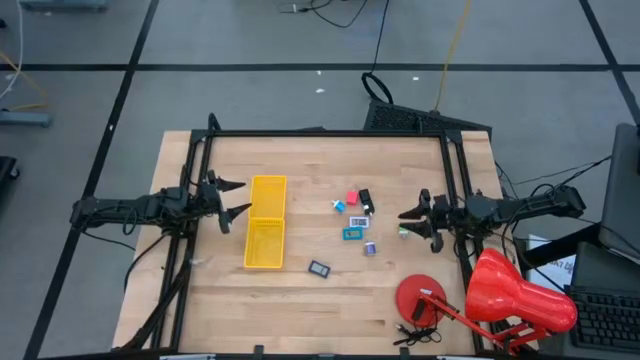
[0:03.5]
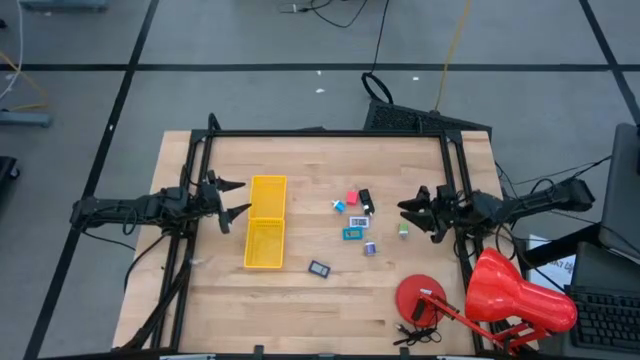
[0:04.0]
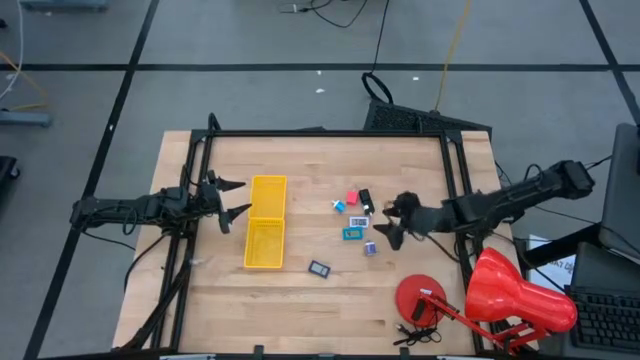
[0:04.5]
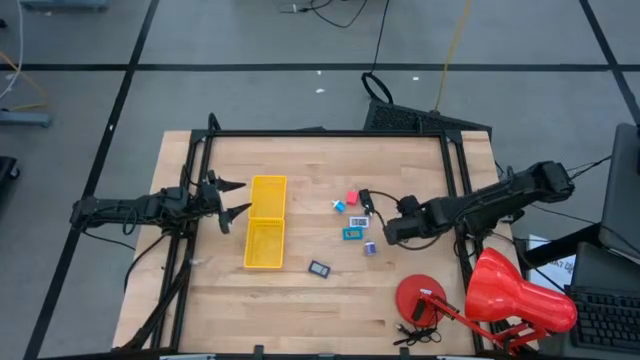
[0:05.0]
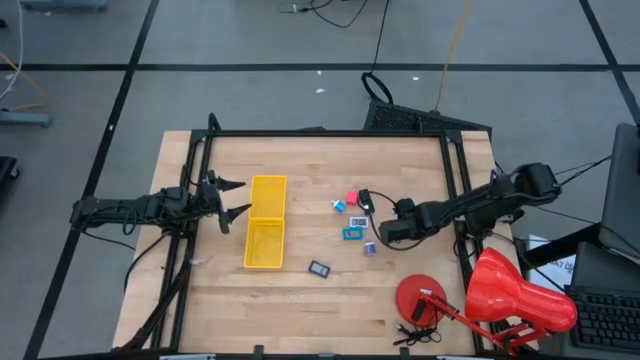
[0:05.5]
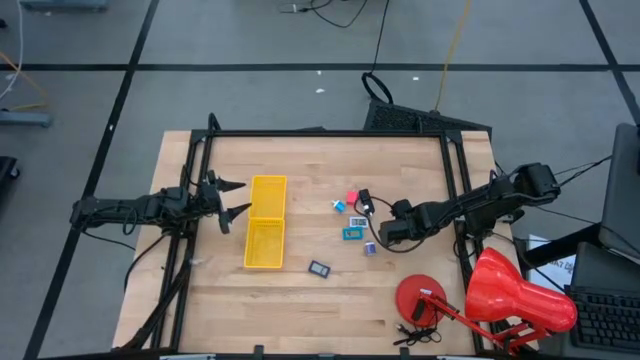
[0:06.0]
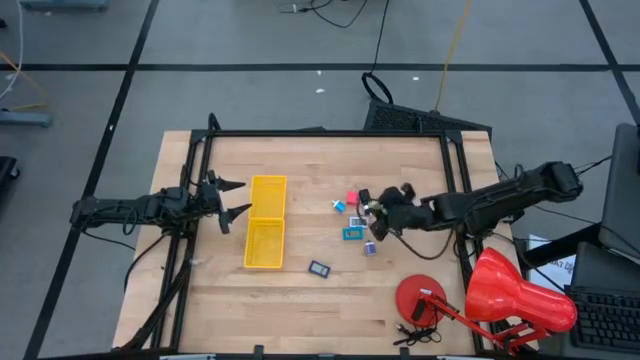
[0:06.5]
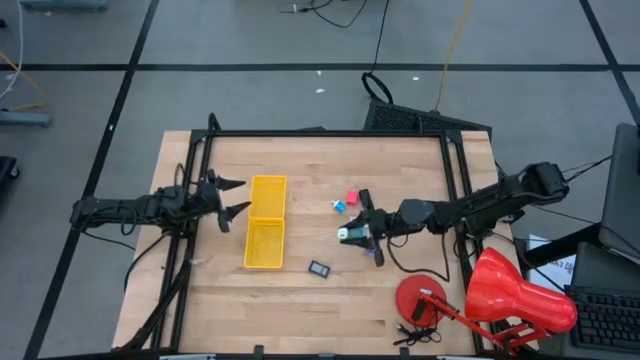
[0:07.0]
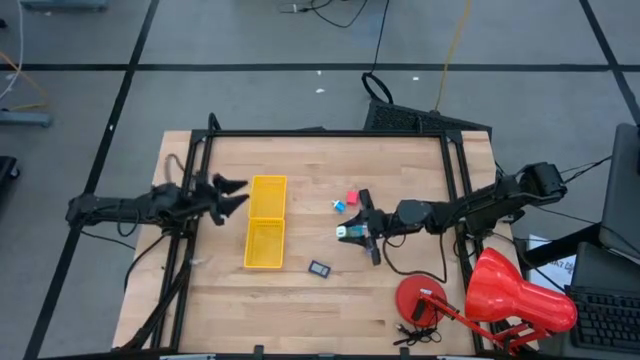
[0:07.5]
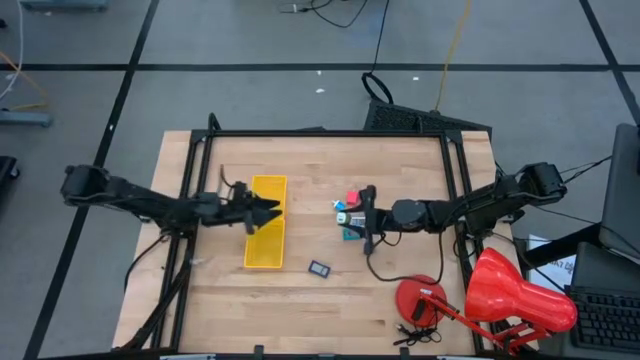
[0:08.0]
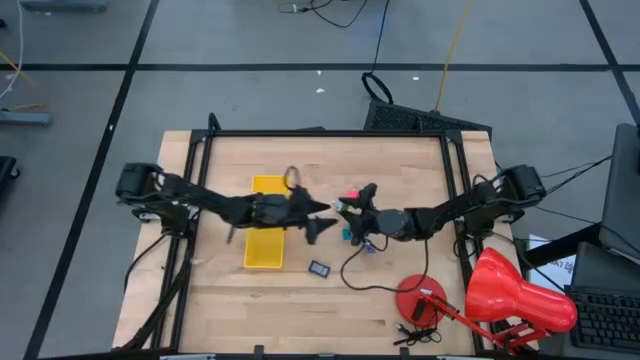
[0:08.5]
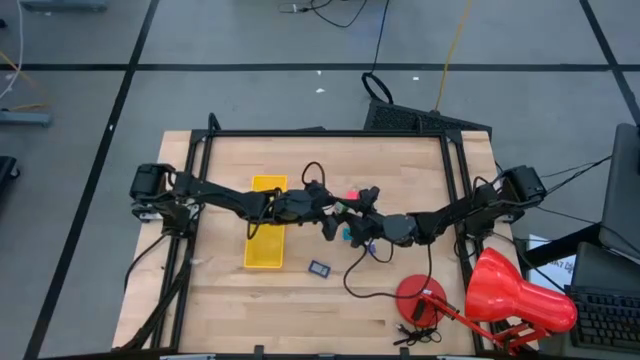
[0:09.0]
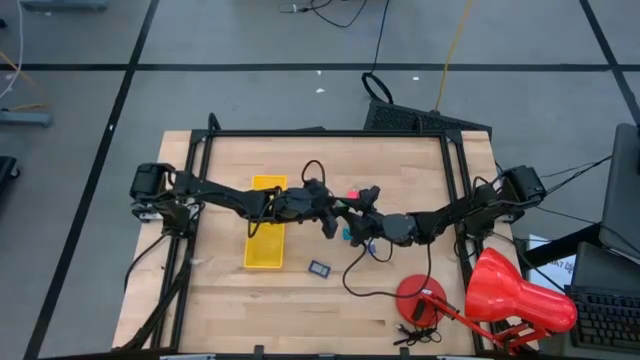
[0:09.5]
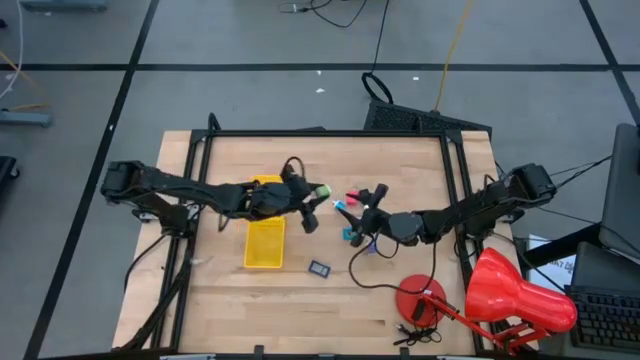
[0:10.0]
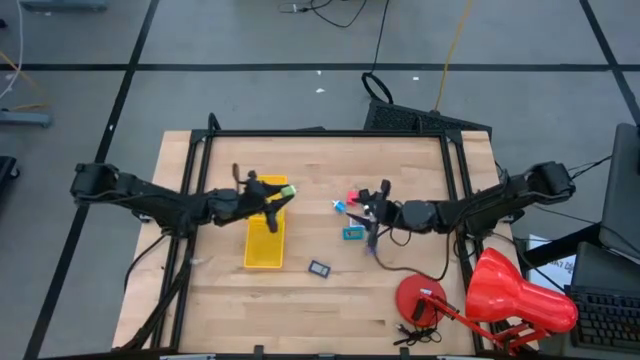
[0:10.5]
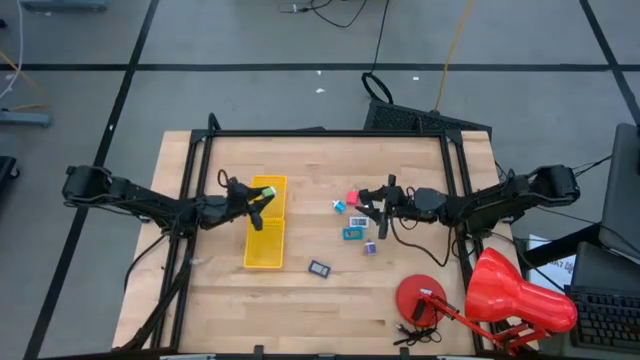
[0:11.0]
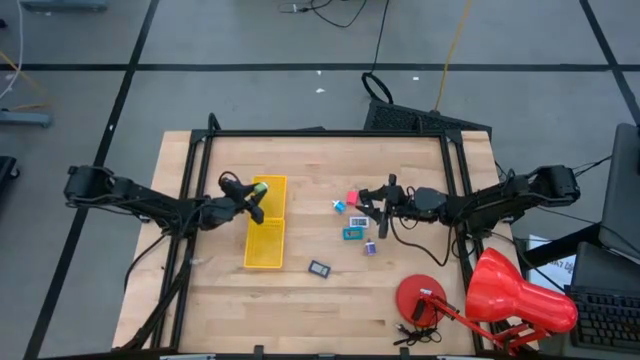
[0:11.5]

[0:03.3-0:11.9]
Task: Pick & Place Office items
Put the green adapter into the top yellow basket

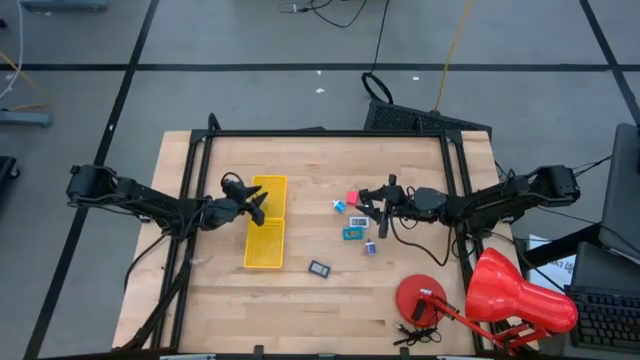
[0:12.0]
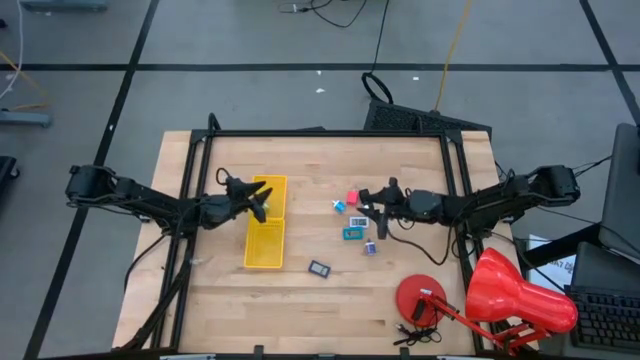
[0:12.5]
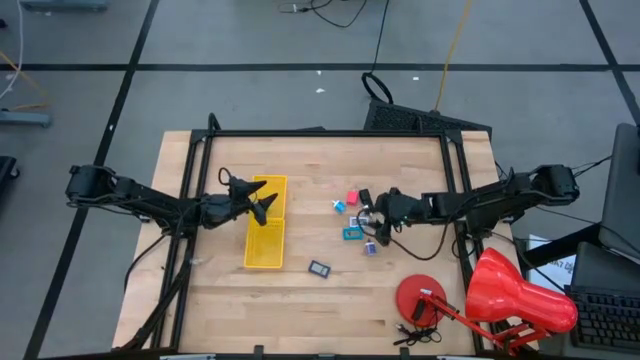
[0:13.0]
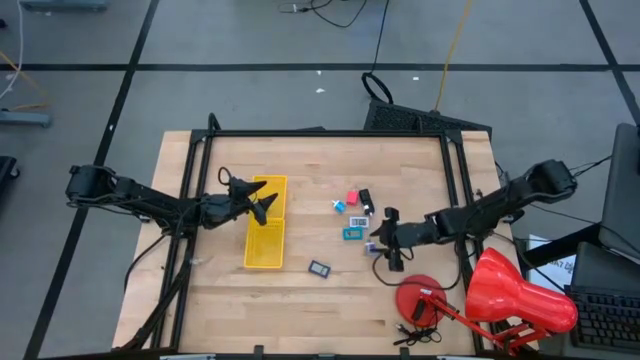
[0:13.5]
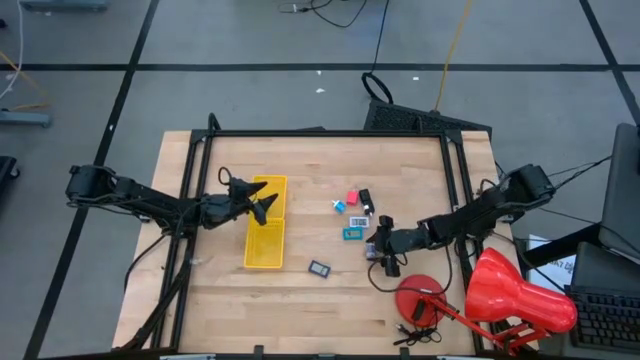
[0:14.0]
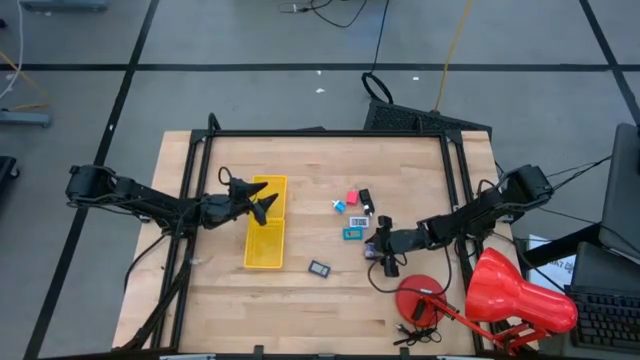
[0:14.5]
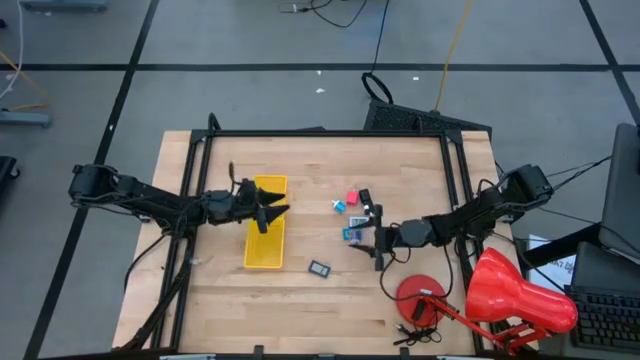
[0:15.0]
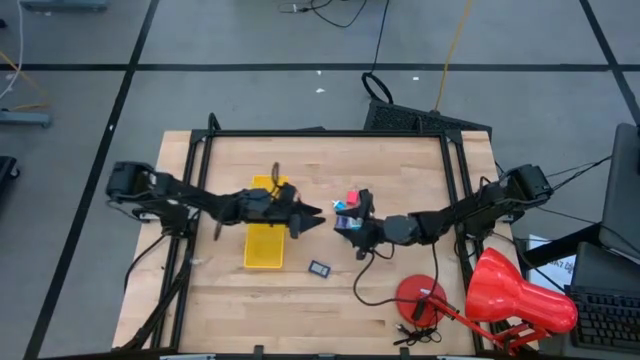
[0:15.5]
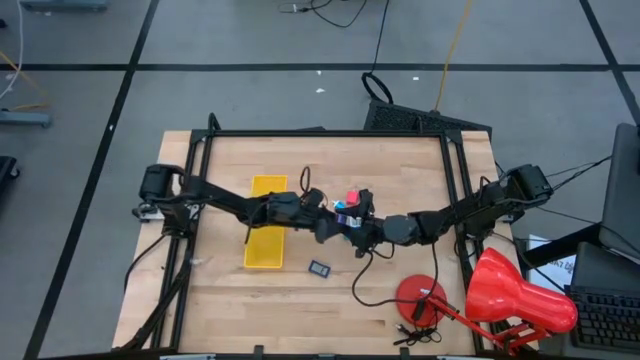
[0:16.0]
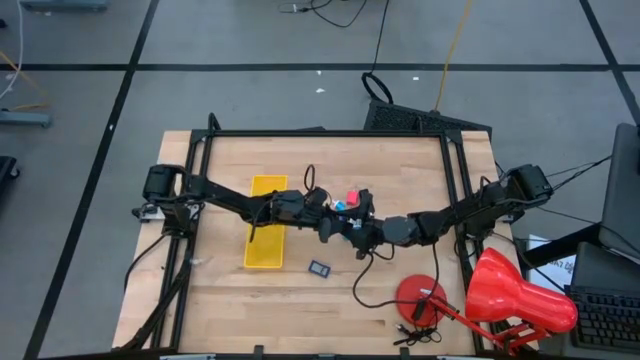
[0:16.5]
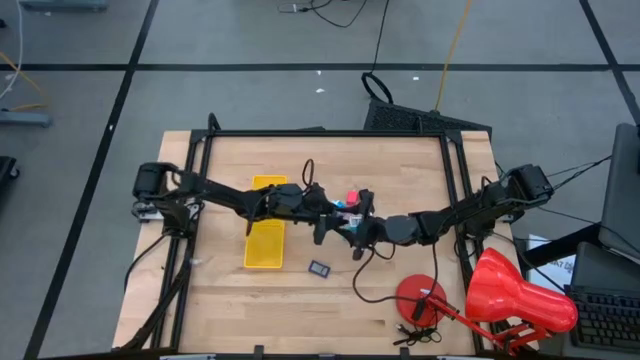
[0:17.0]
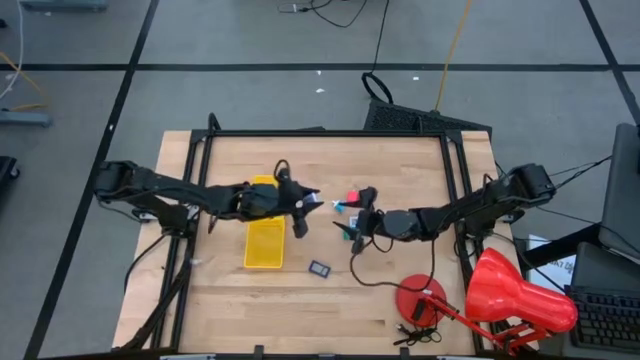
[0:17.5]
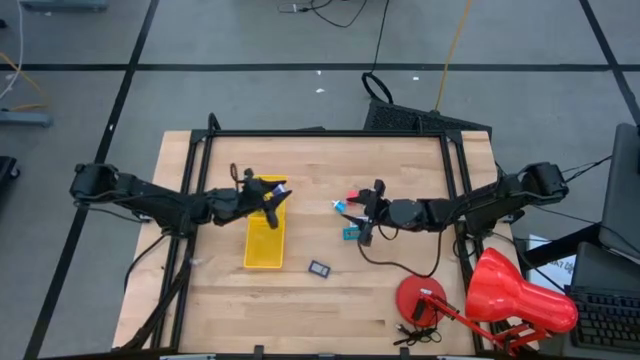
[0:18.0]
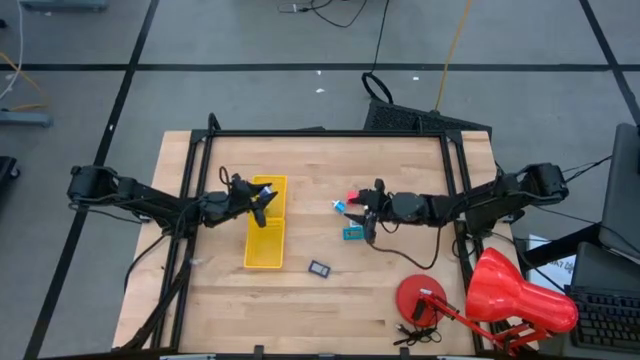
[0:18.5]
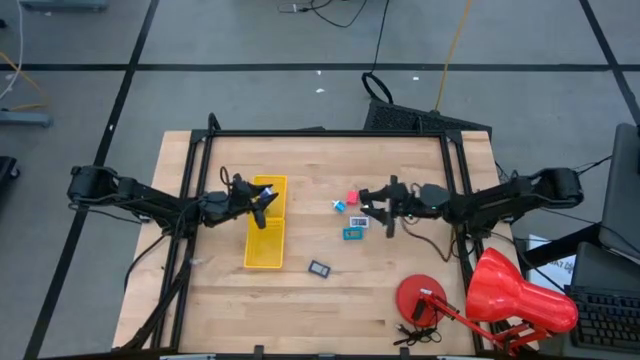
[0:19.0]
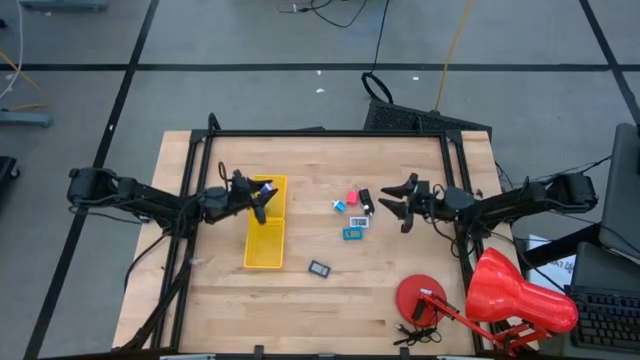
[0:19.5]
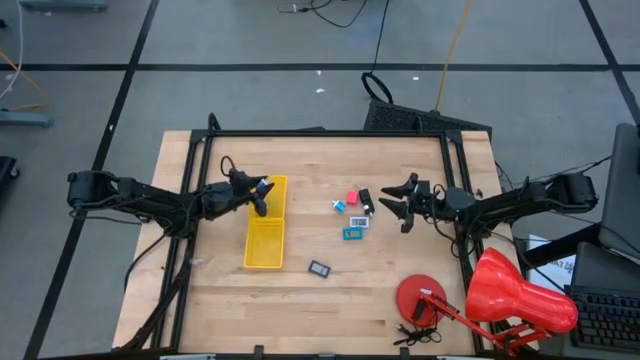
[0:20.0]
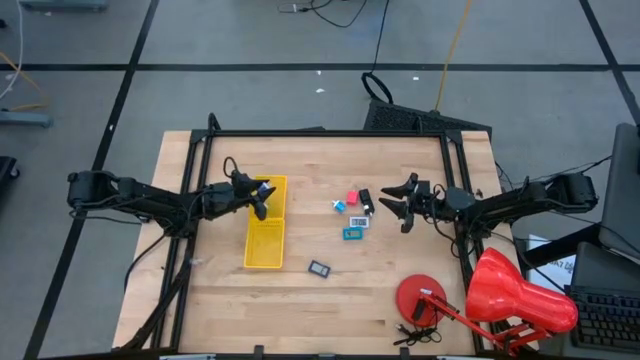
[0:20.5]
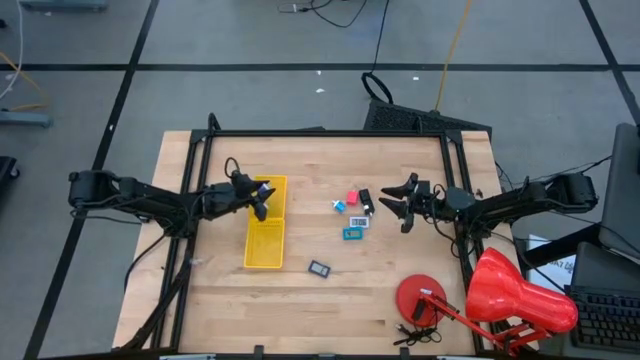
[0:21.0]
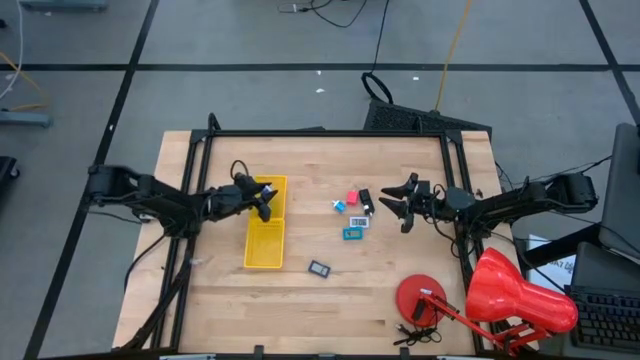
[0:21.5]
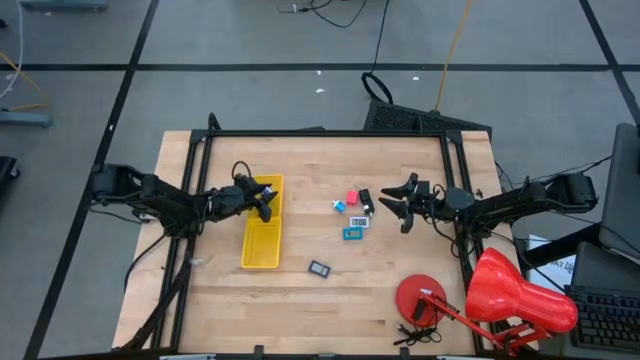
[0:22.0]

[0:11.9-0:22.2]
Put the blue adapter into the top yellow basket

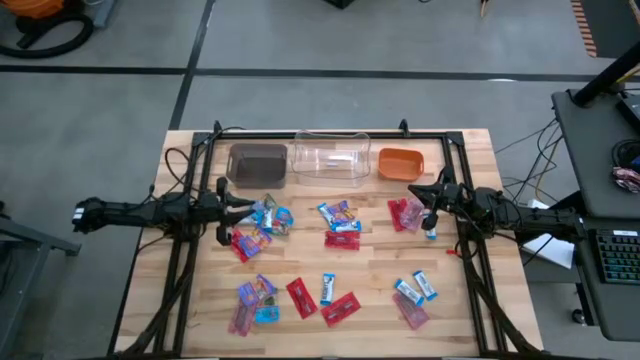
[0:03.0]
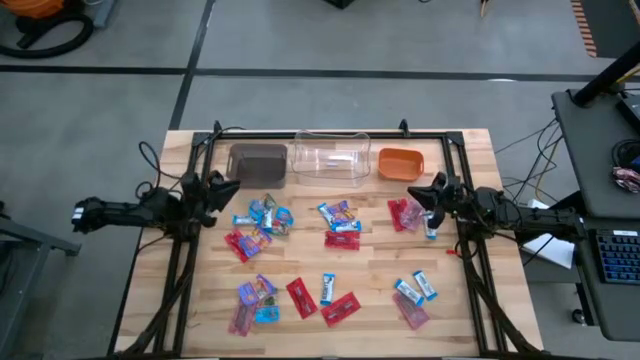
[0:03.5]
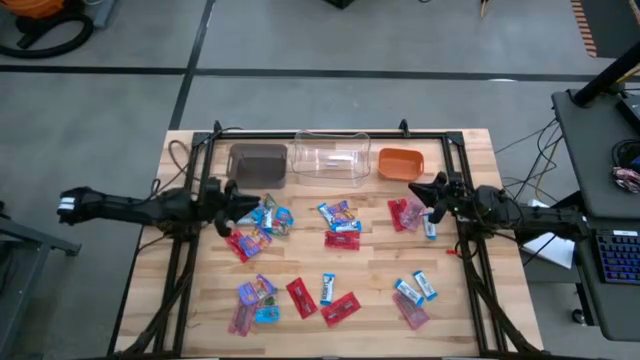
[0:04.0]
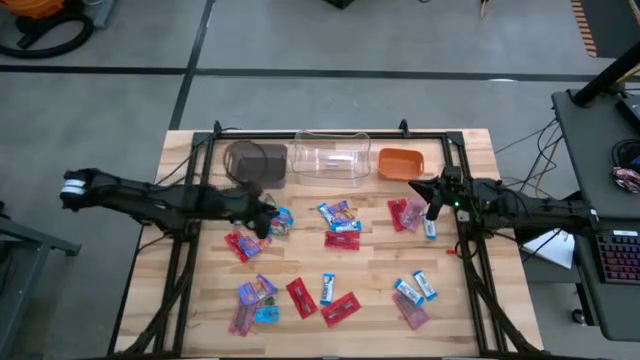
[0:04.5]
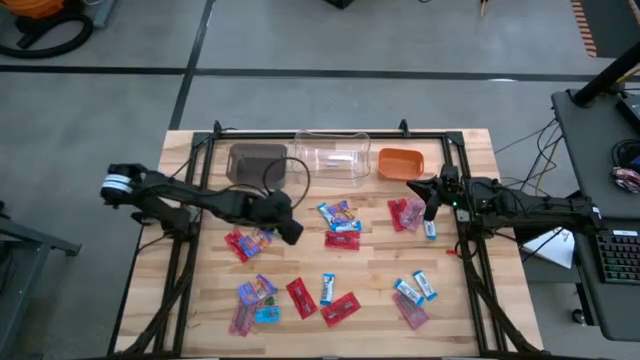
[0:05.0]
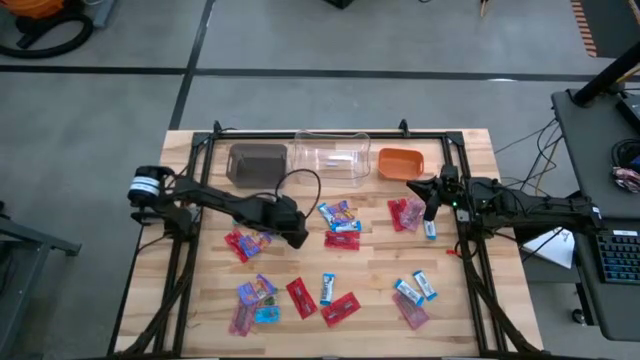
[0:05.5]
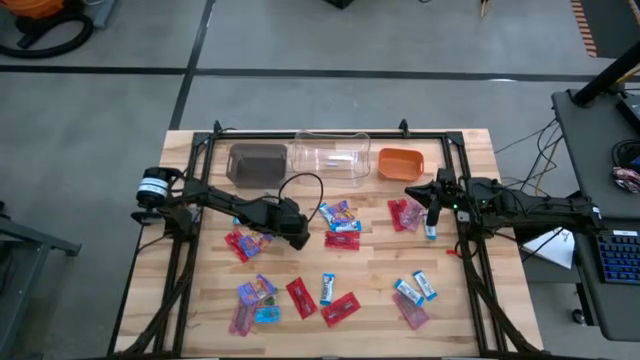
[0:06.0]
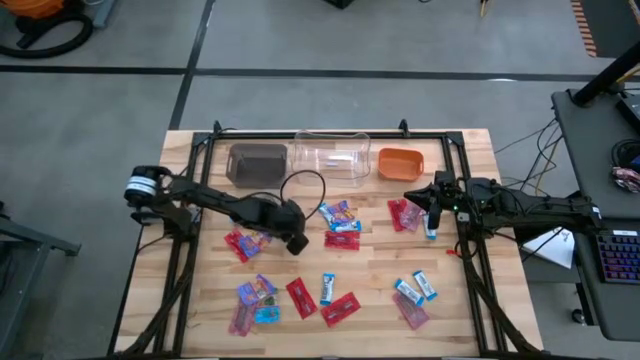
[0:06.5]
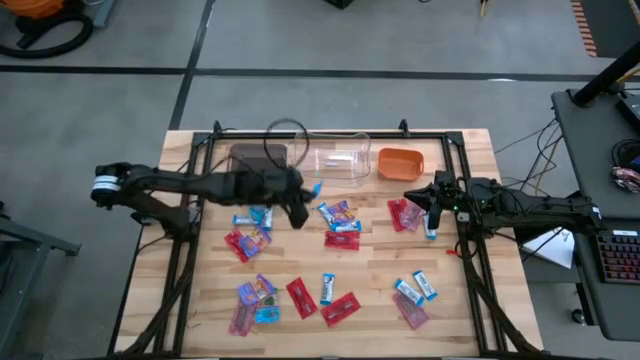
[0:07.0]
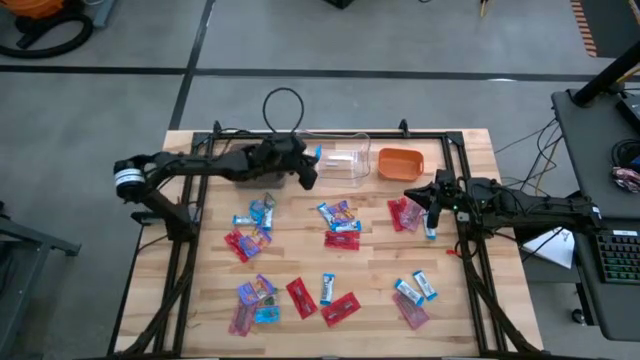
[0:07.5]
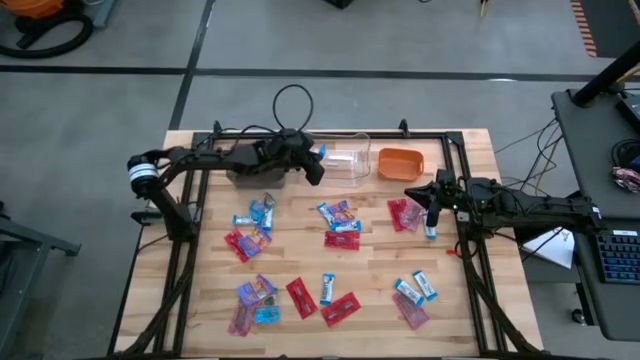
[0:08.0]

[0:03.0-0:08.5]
Task: Sort candy
Put the light blue candy into the transparent bin
